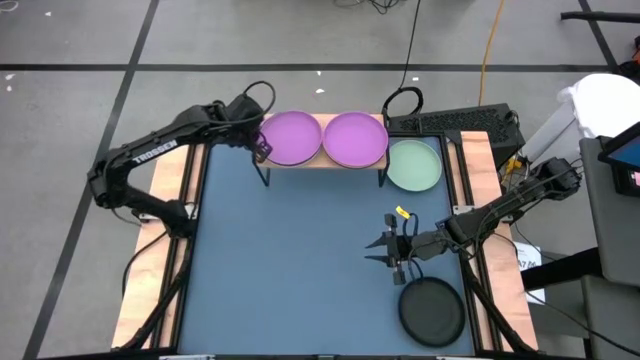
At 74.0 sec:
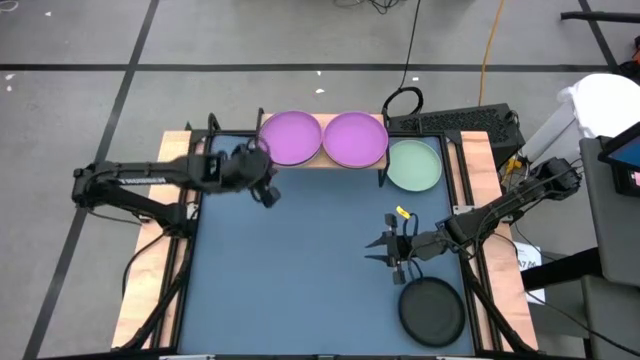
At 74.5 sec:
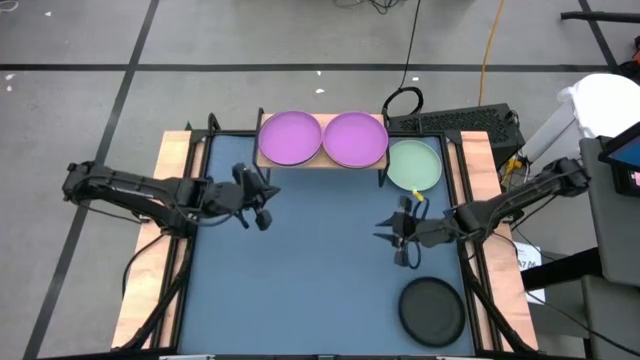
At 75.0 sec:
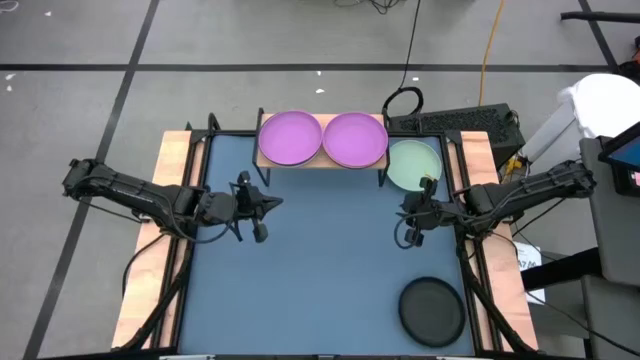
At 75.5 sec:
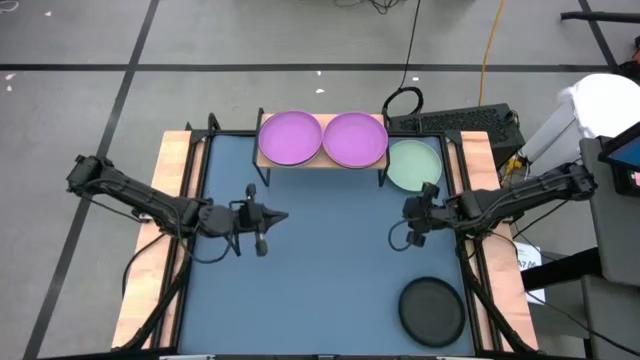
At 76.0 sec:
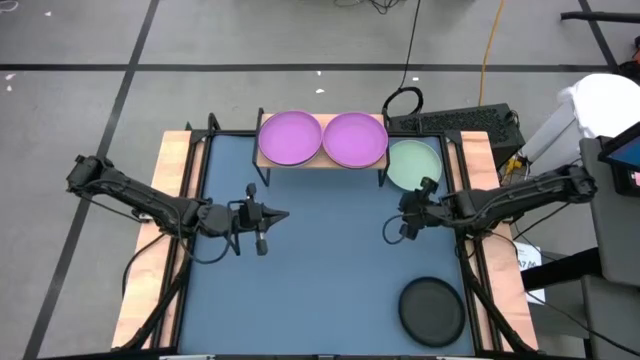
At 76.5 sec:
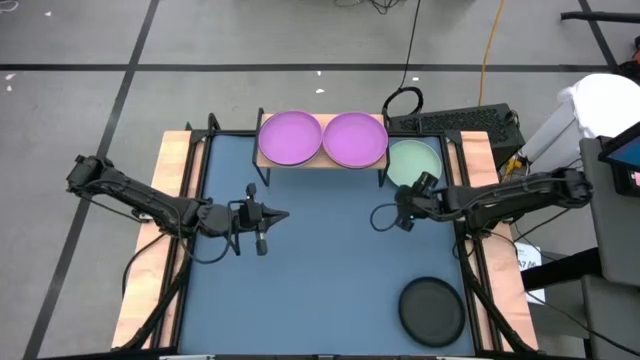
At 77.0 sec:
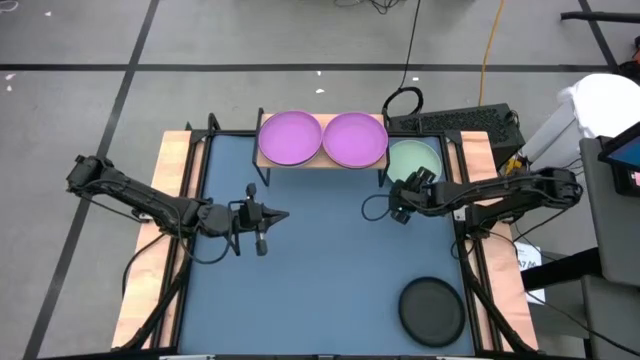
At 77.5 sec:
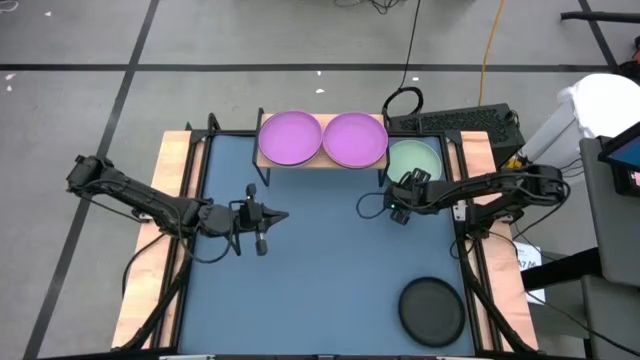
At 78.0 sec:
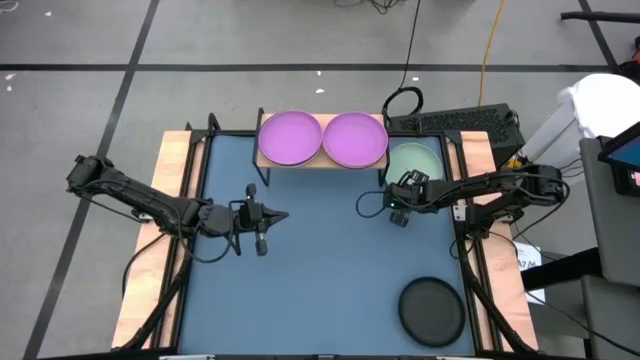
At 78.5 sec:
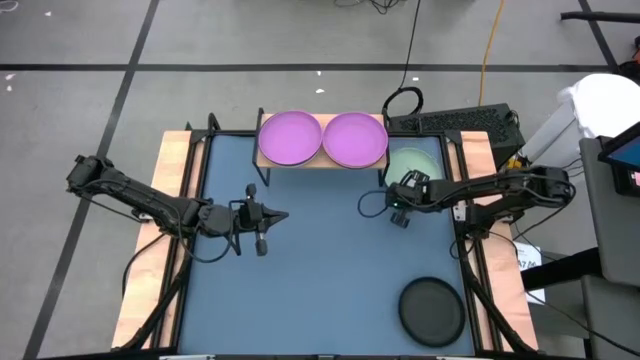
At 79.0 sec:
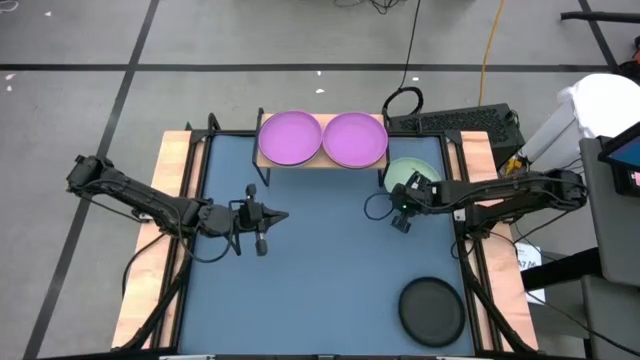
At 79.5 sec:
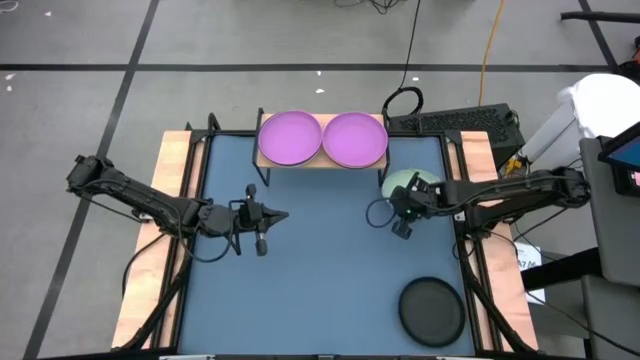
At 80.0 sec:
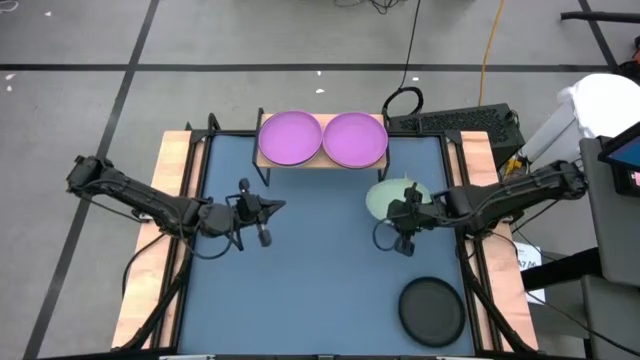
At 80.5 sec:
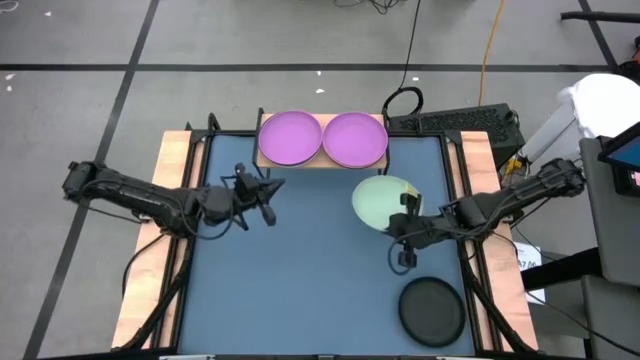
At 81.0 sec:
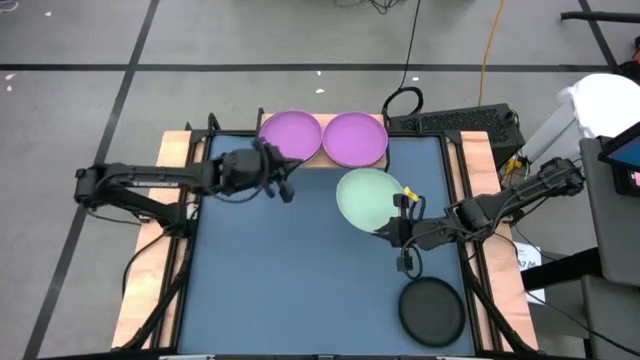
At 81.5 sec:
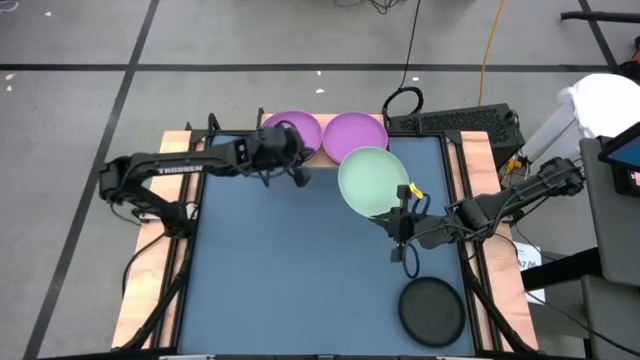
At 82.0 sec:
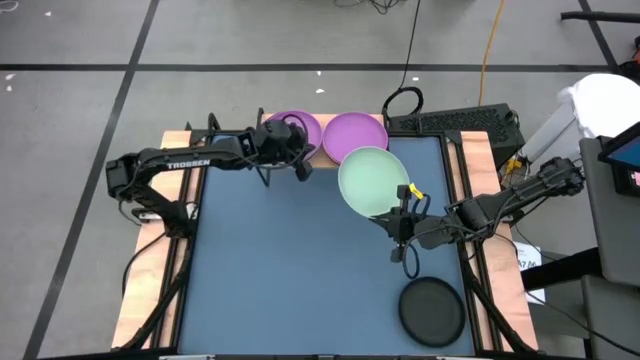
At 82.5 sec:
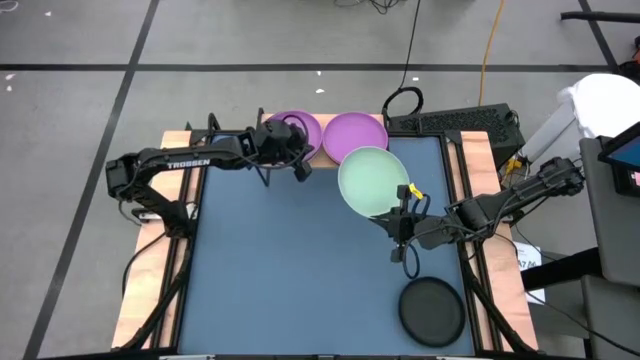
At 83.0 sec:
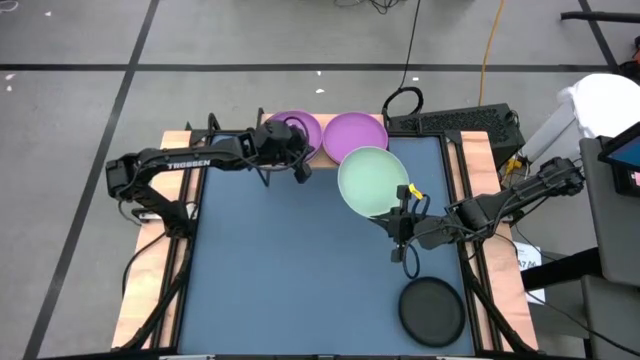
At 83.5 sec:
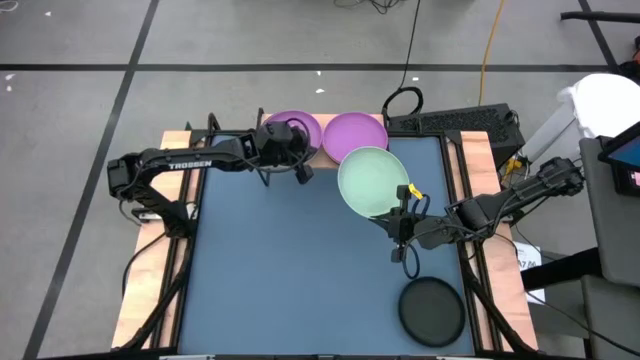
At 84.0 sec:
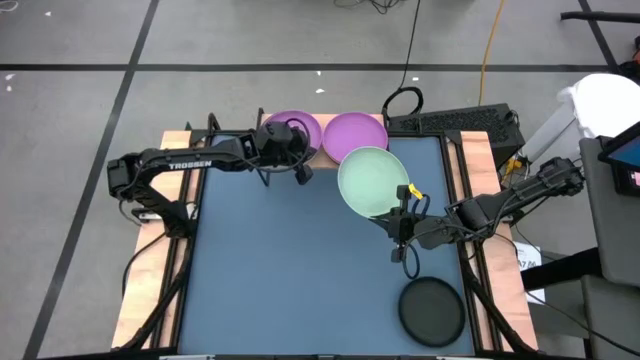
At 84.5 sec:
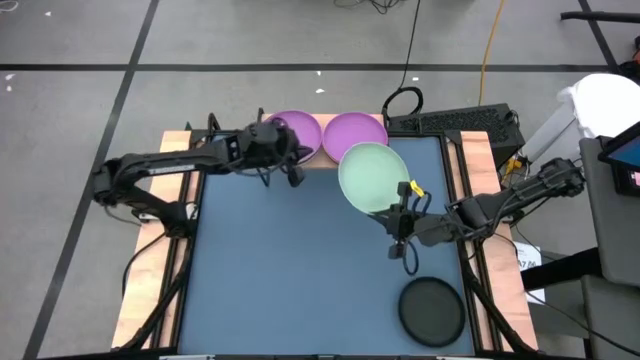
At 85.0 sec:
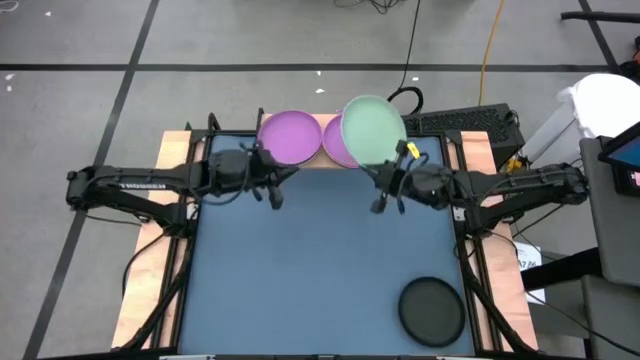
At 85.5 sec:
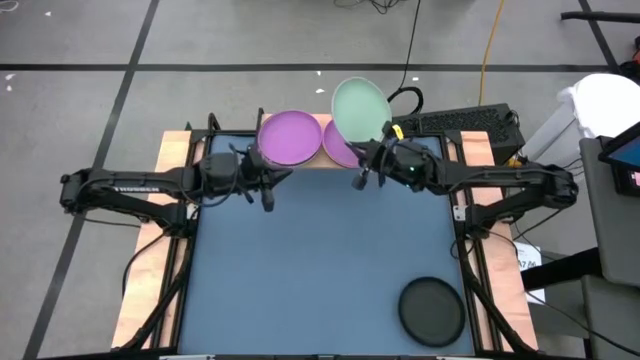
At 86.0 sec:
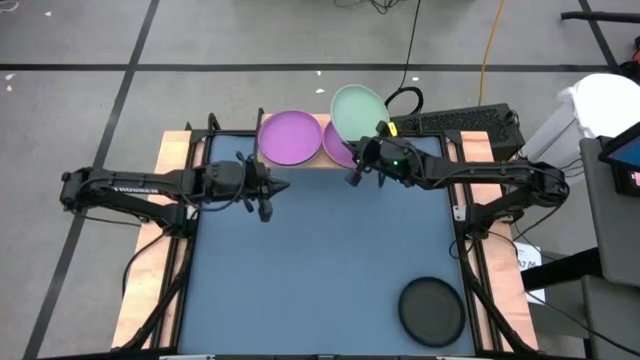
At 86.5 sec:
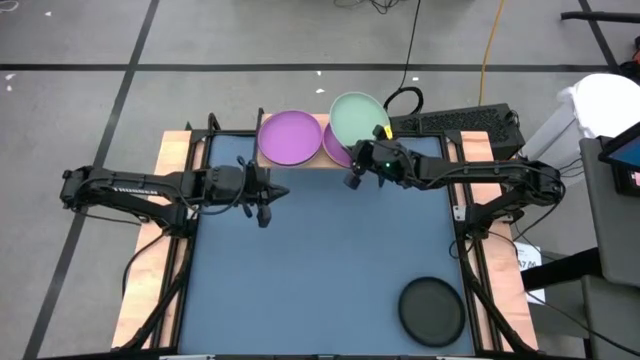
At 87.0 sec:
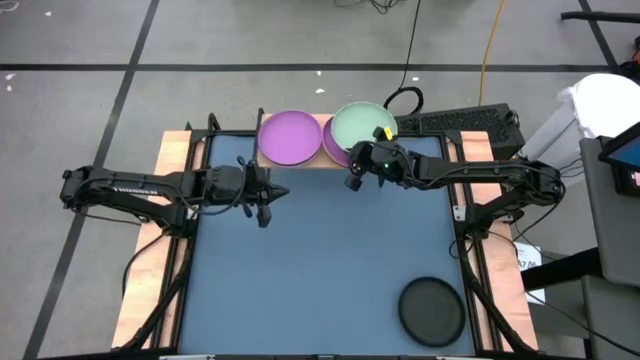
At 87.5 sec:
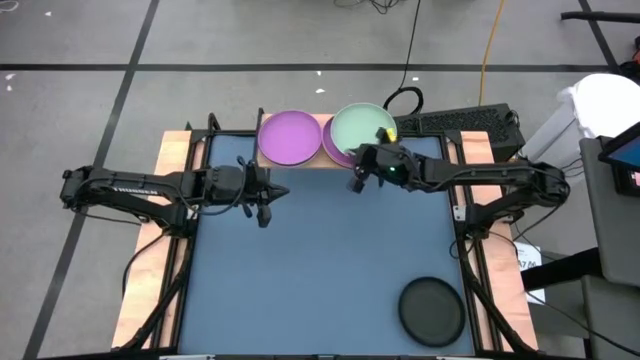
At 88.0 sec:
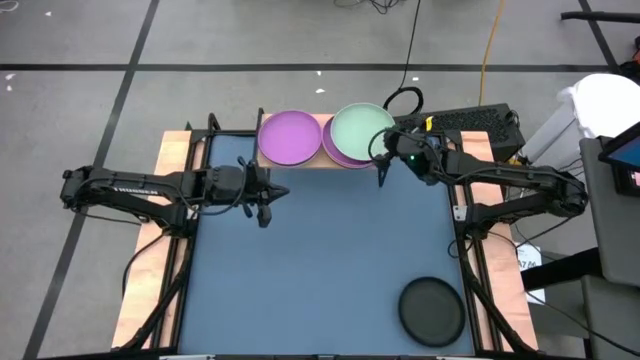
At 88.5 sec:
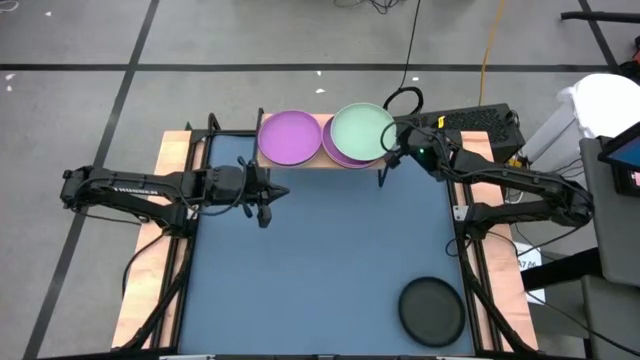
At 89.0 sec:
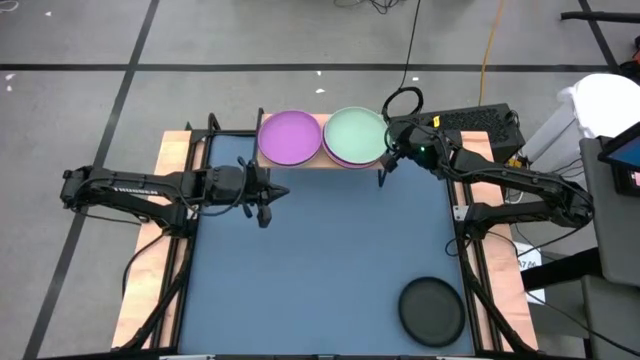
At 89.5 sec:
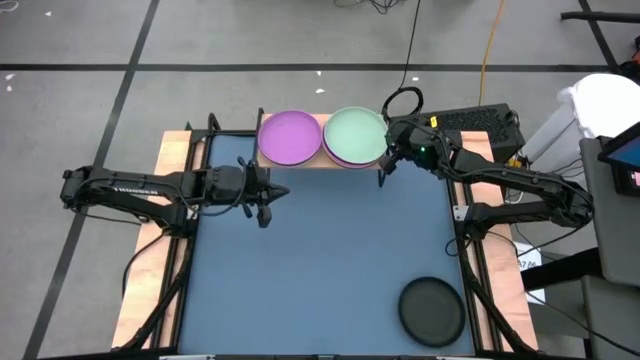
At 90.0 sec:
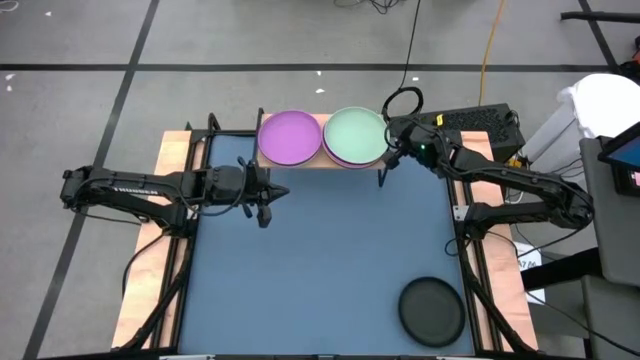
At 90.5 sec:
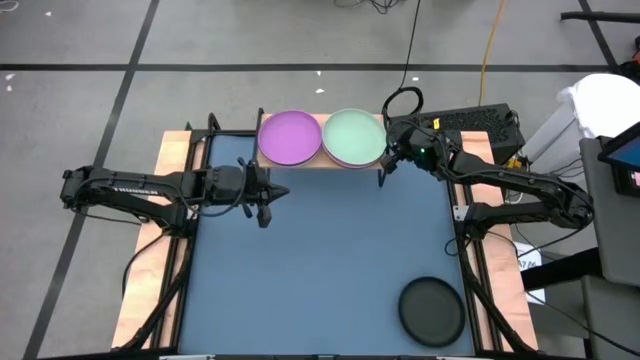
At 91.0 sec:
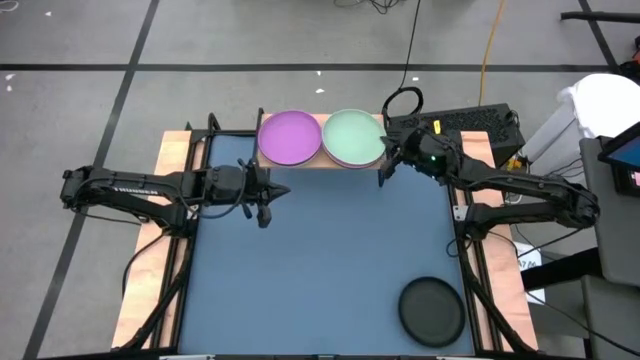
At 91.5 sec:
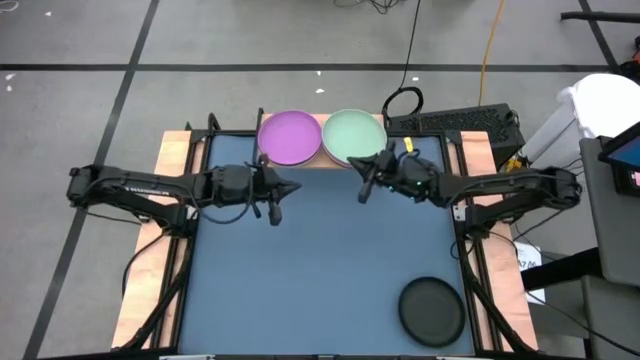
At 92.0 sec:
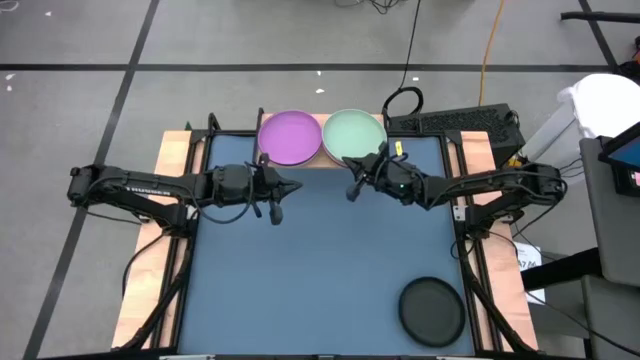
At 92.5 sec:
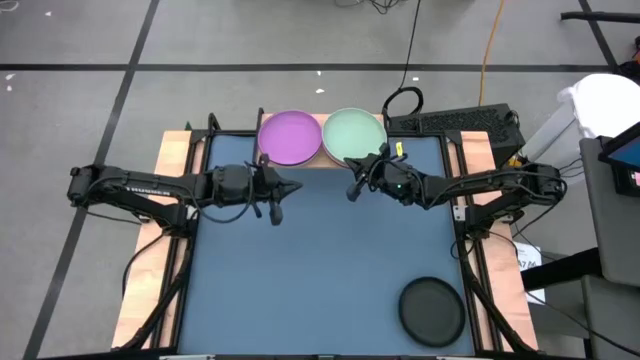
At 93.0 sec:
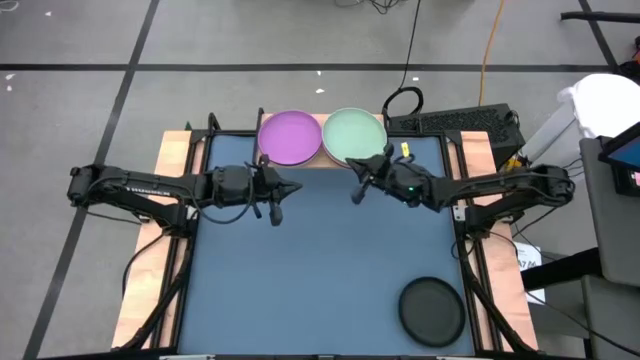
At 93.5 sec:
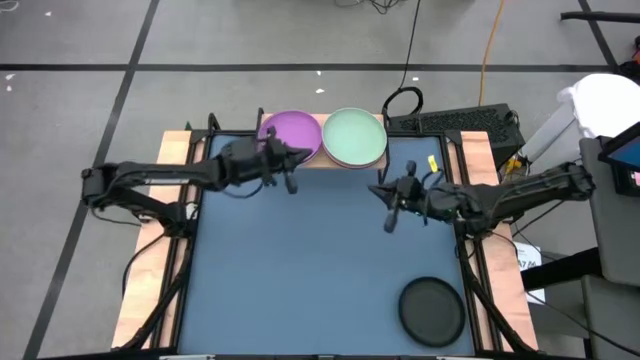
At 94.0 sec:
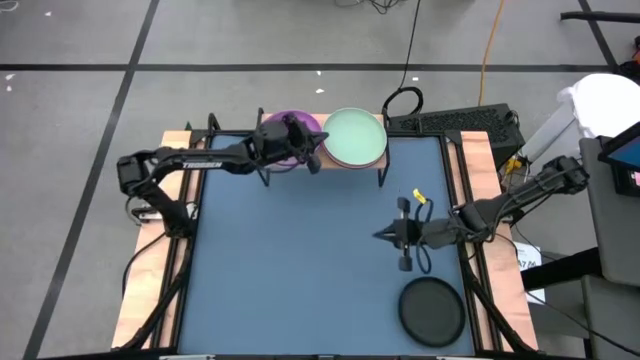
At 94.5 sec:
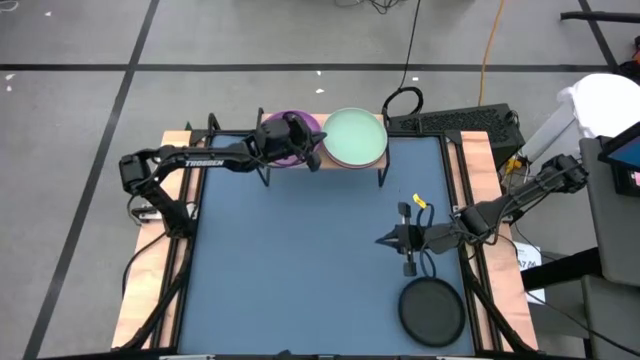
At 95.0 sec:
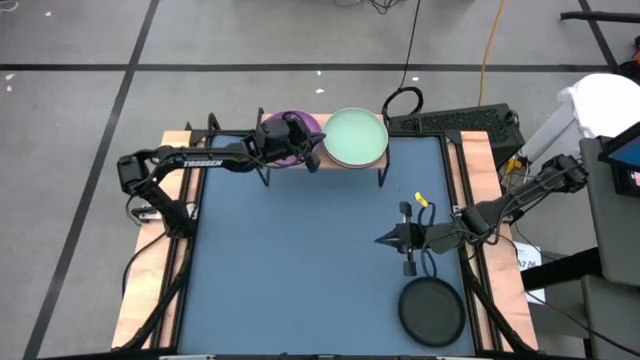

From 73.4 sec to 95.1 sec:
Task: Place and stack plates onto a shelf
Stack the green plate on top of the purple plate on the shelf
